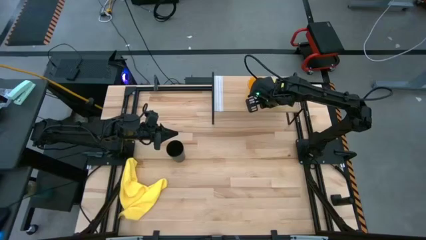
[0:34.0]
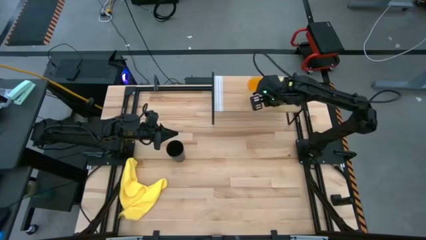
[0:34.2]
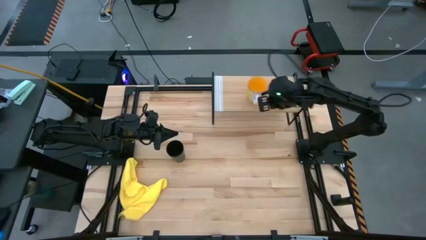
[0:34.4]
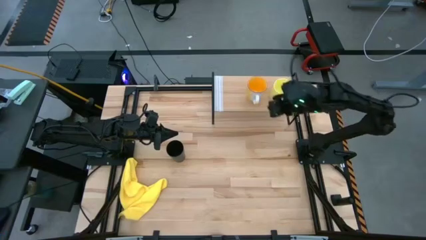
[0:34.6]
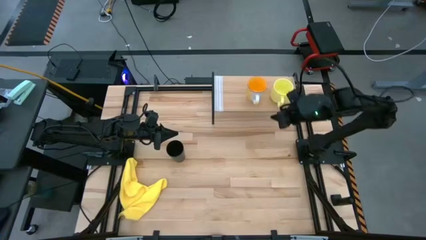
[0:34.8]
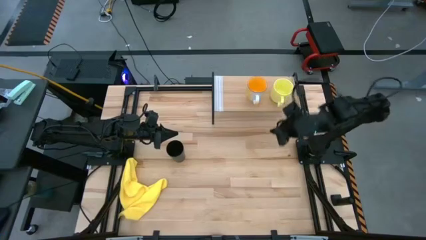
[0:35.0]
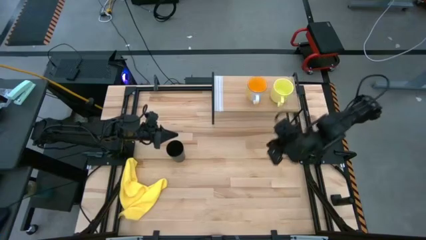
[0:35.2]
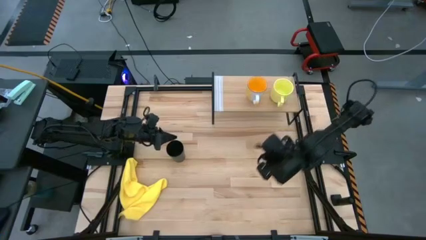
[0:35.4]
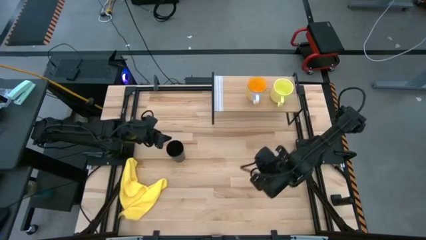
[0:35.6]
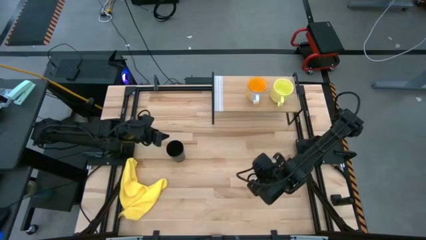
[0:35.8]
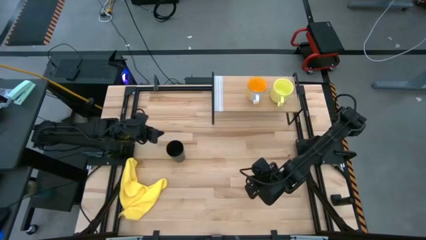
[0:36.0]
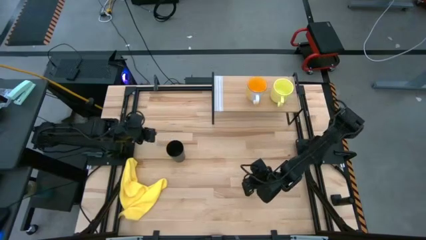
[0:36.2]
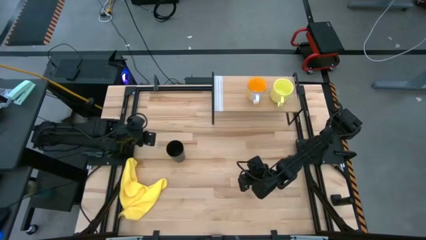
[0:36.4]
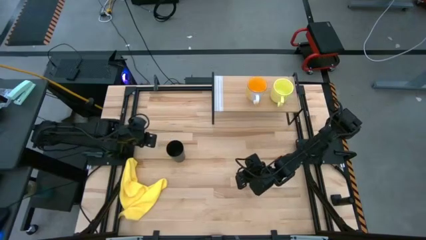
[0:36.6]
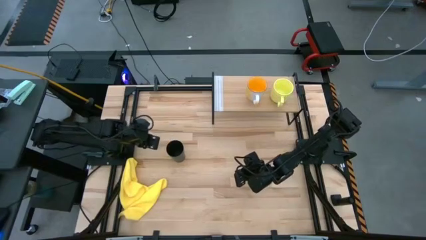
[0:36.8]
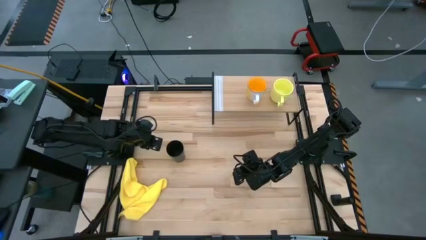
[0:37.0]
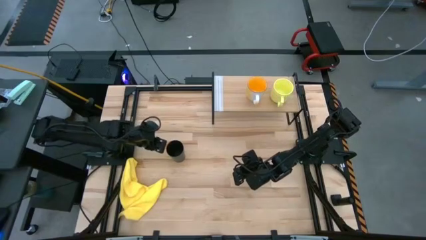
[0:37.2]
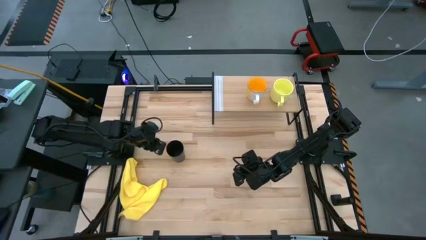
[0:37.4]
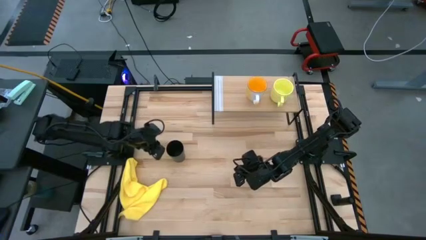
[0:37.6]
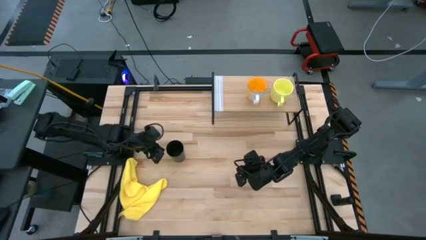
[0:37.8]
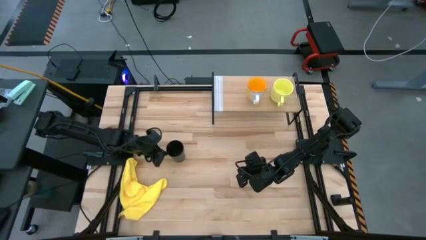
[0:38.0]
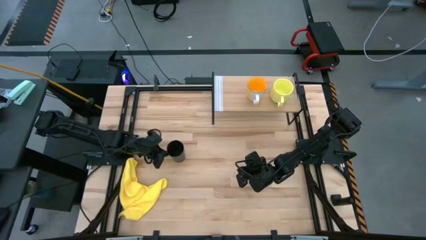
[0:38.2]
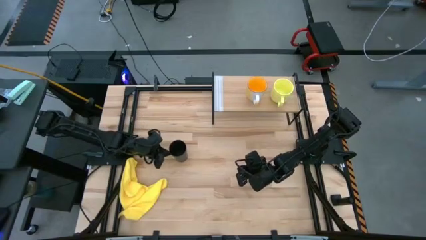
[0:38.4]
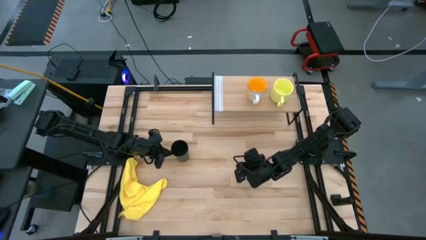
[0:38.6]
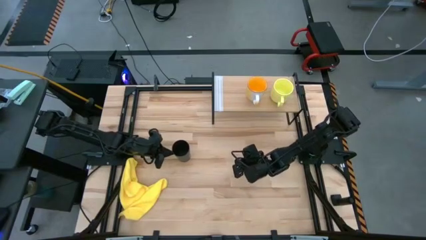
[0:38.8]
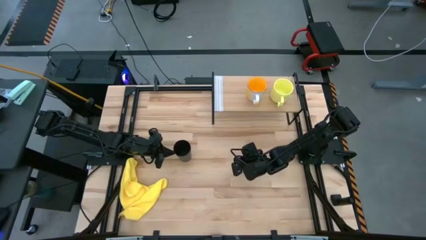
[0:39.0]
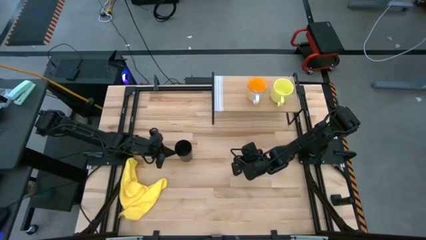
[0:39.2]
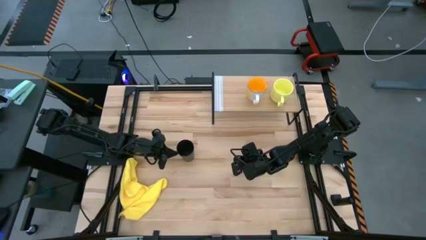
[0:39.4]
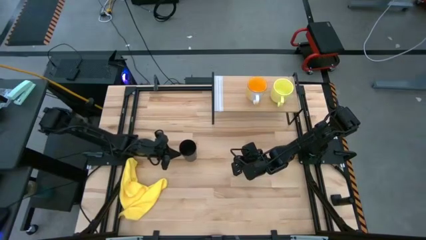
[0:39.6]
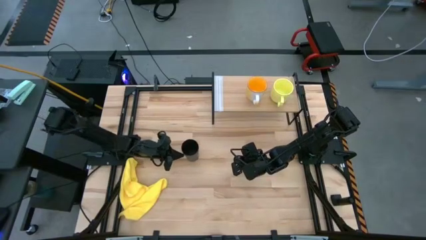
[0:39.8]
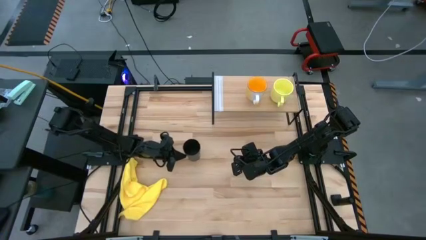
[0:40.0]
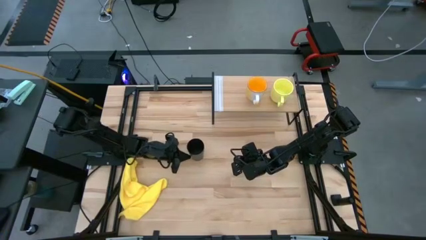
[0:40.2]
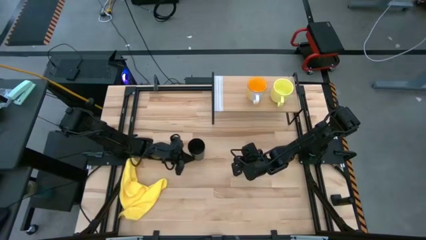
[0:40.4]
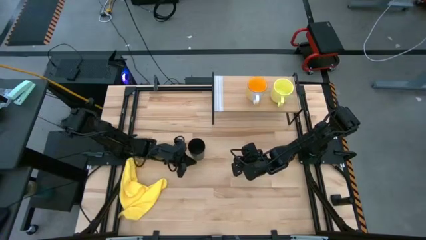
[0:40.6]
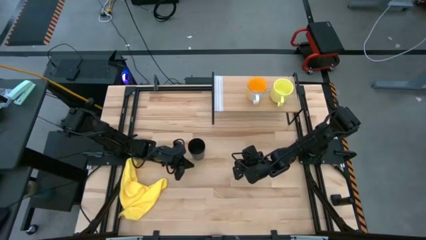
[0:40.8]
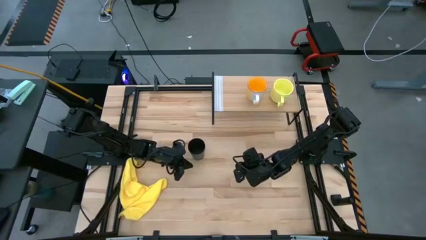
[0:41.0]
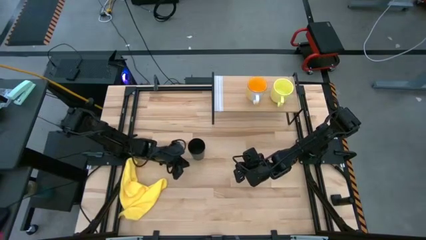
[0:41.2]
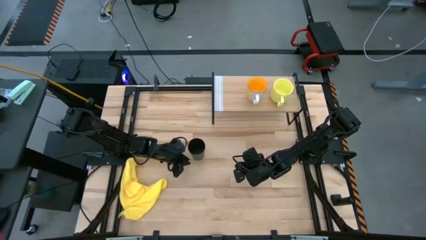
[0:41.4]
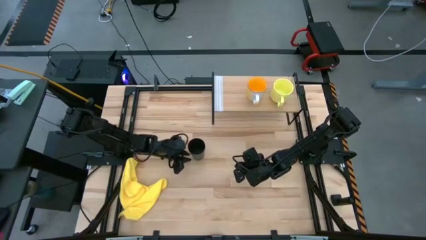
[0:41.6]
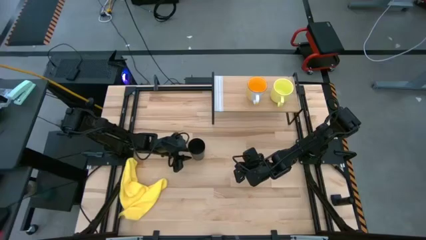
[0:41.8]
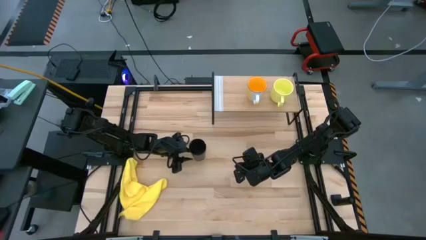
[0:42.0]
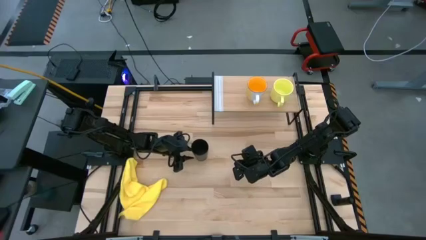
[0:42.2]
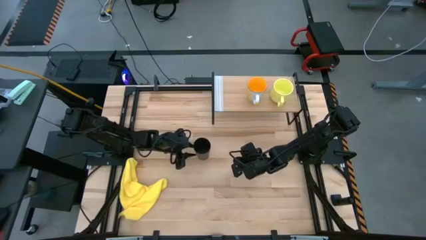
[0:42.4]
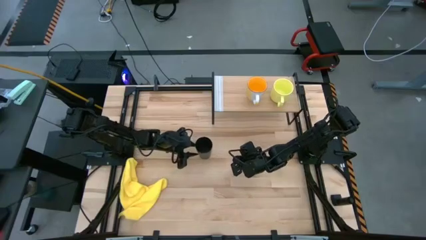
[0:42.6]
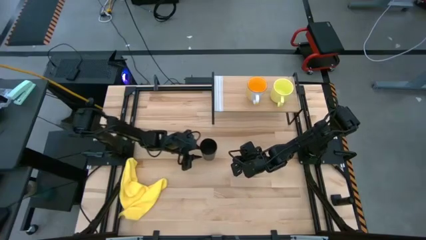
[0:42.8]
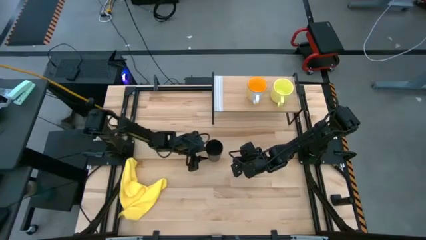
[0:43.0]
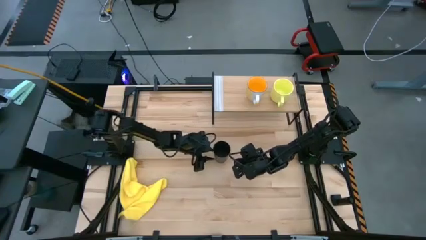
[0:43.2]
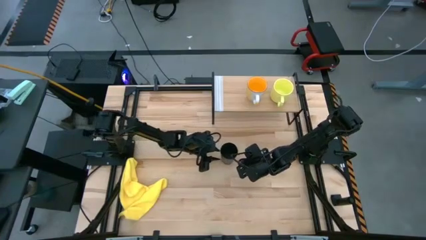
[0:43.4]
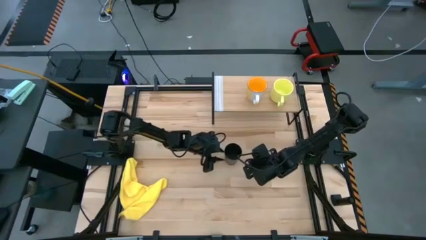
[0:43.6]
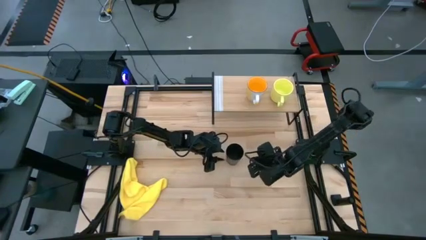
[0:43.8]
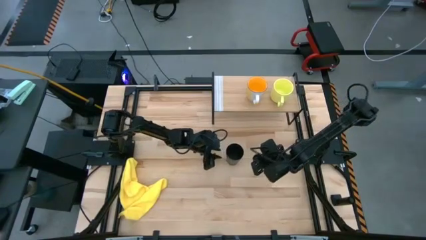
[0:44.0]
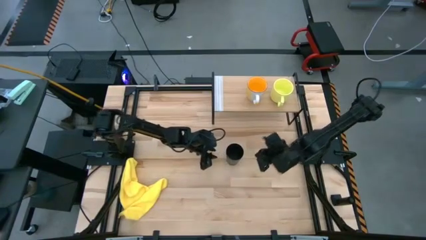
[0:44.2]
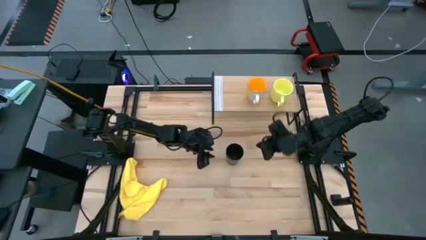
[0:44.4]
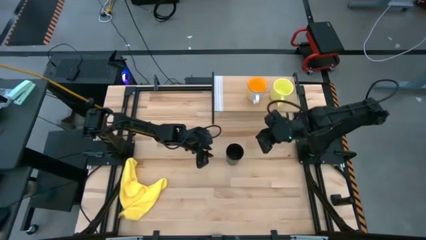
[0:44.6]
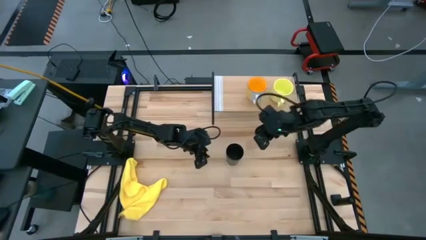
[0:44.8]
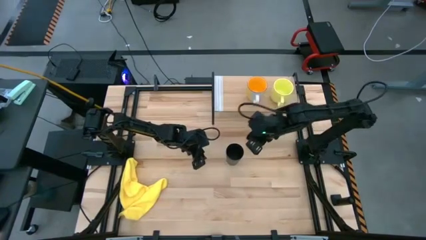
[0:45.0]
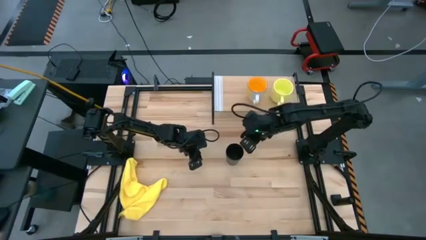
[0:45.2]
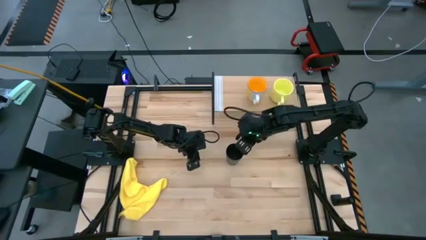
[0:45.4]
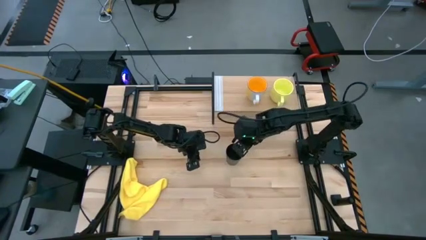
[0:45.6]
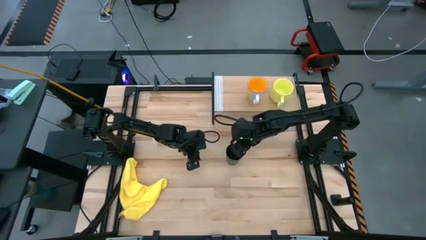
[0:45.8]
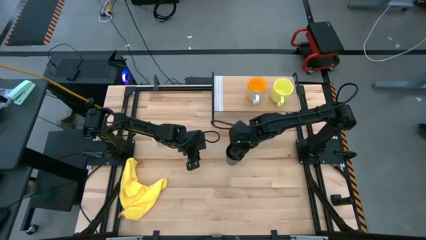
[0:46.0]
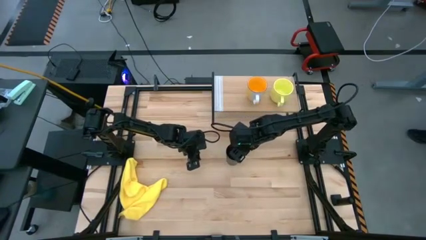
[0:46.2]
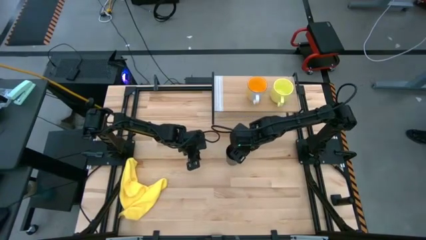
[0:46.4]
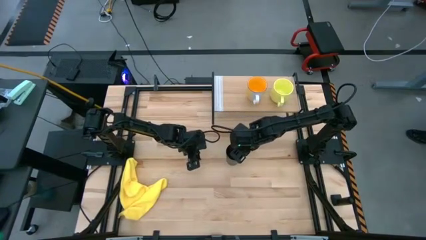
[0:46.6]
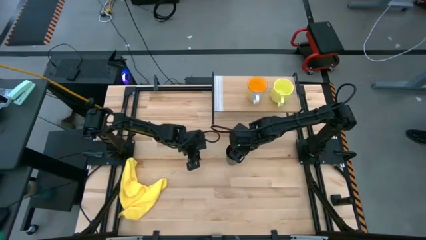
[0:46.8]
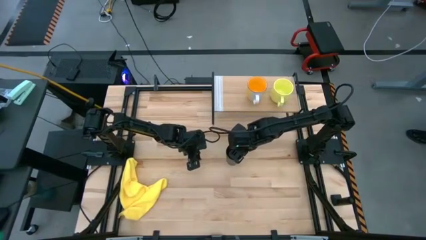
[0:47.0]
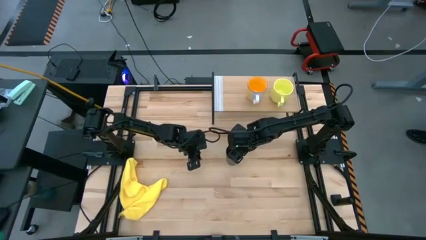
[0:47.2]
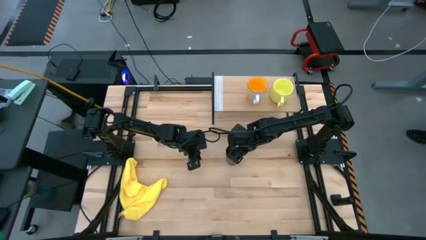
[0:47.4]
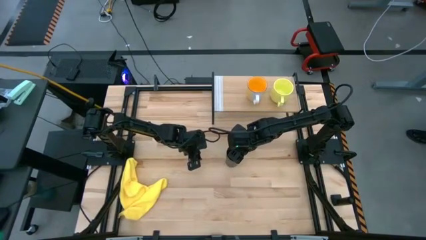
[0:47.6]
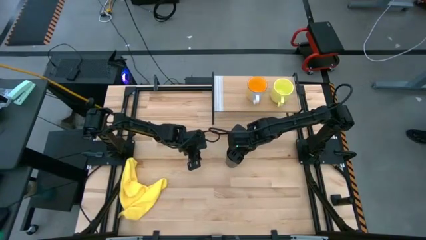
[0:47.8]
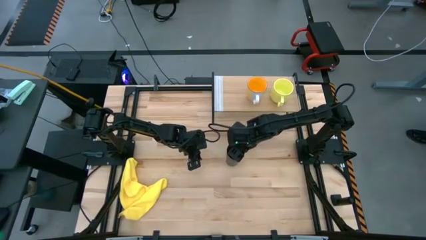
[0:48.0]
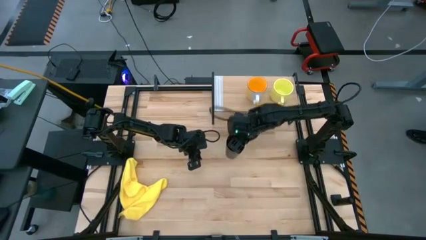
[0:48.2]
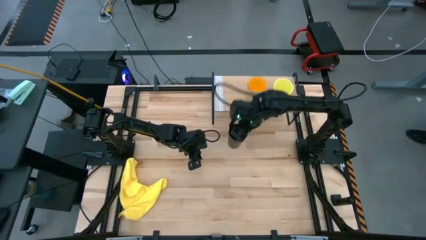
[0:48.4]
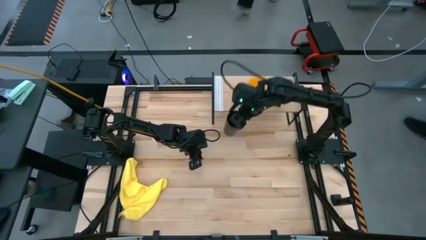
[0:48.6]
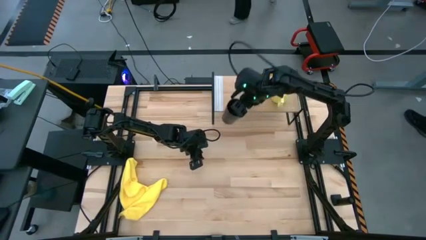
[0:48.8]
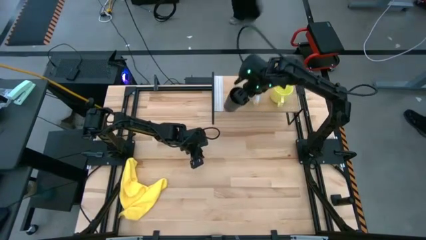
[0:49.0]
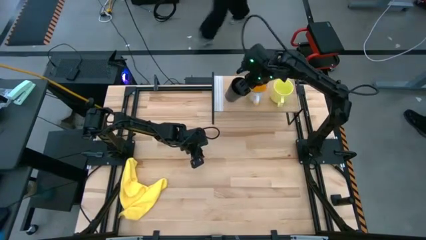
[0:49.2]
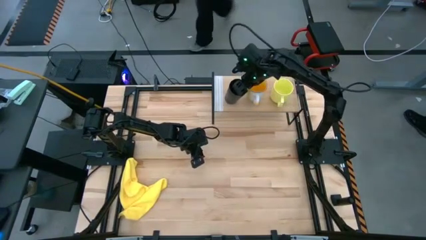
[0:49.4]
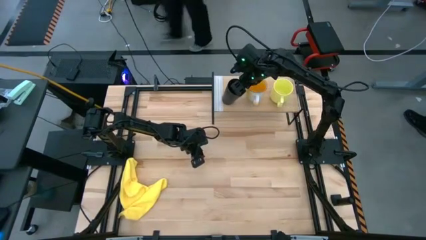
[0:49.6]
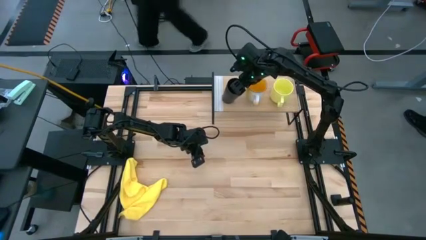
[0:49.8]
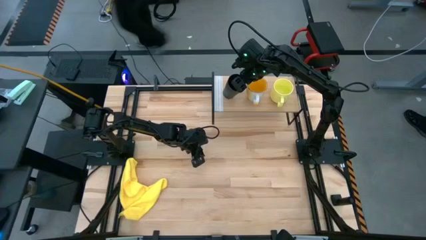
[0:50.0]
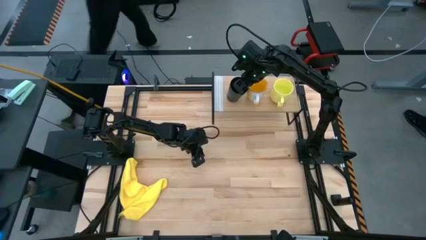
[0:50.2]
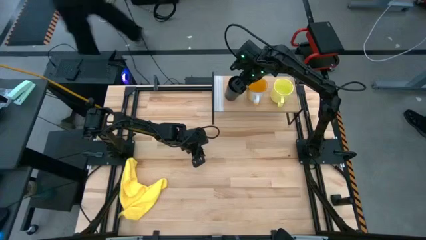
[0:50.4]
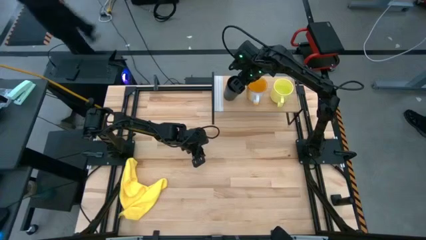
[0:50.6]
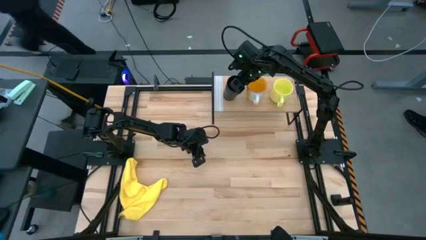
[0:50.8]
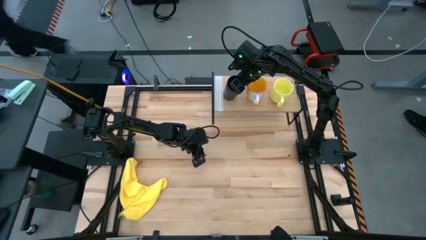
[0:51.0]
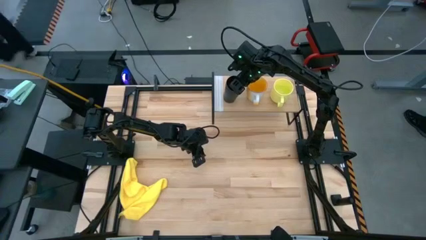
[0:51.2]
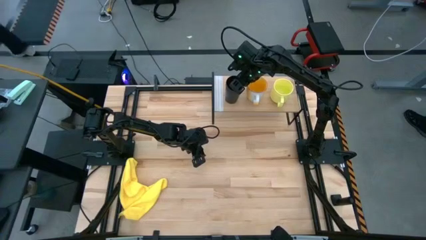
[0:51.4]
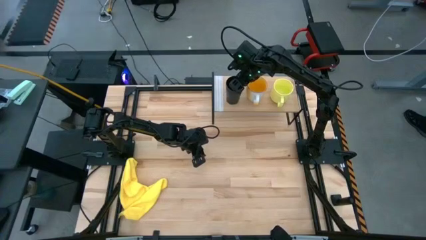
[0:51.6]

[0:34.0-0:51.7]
Task: Stack small to large cups/mugs on shelf
Put the black cup on the shelf
